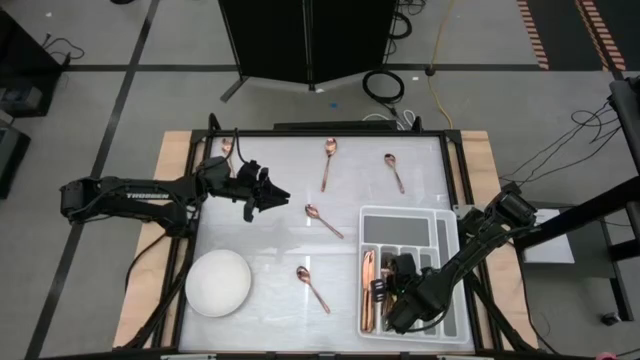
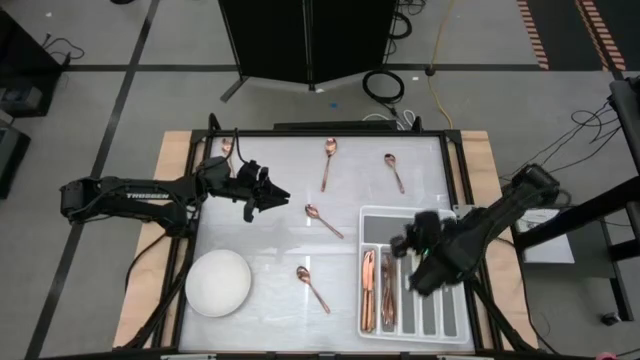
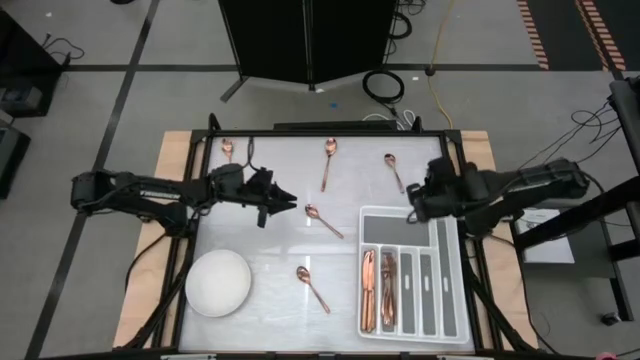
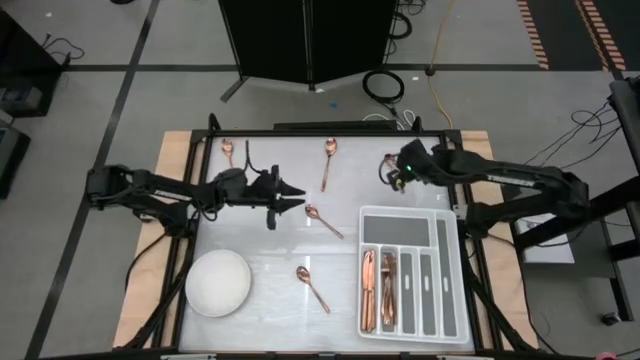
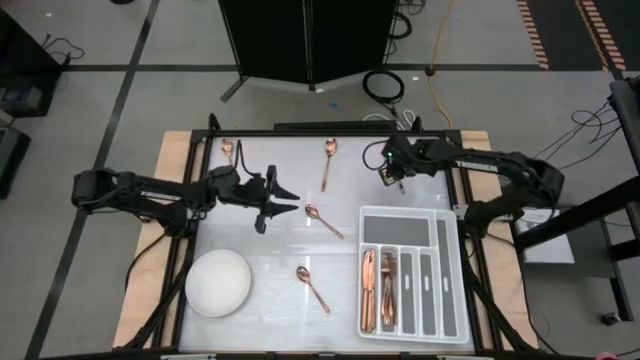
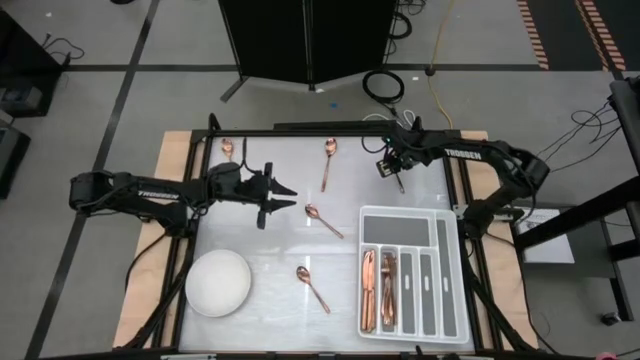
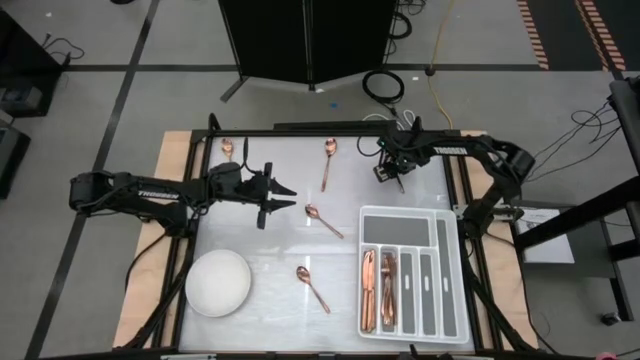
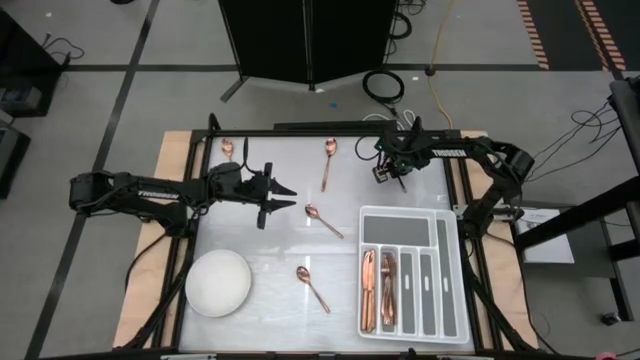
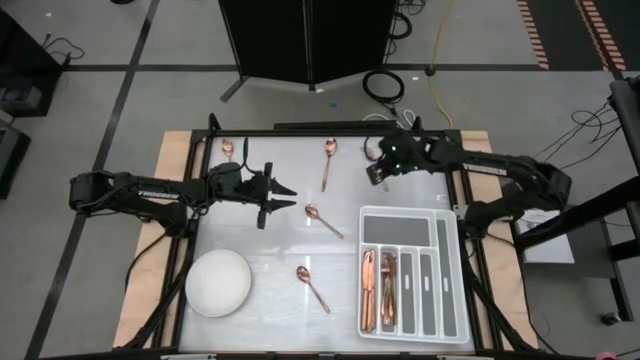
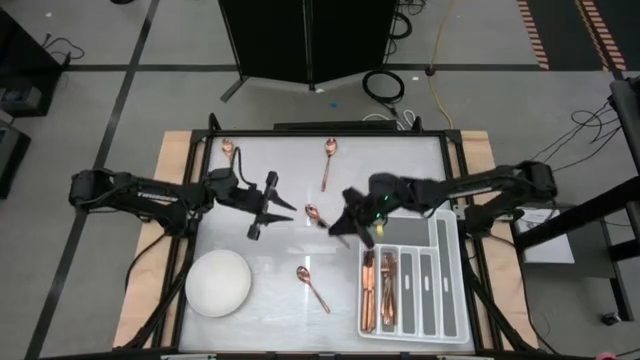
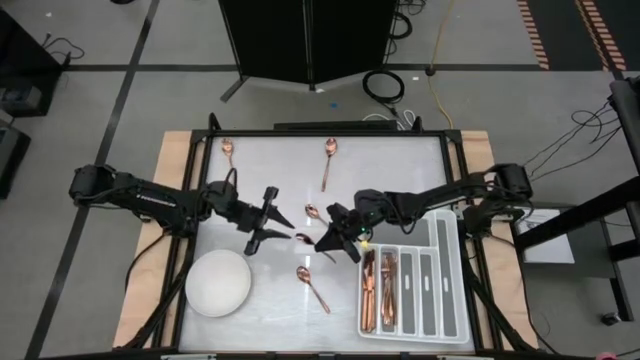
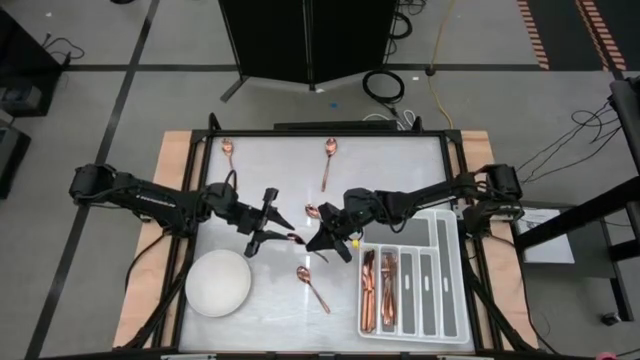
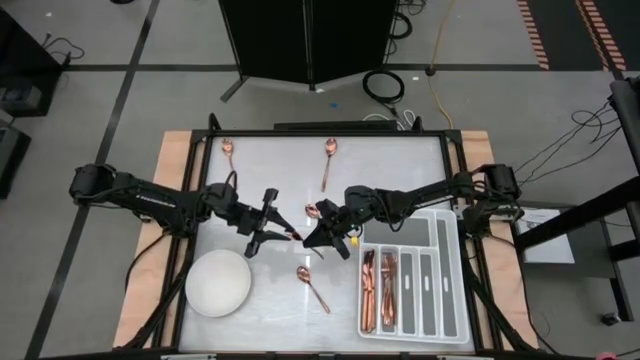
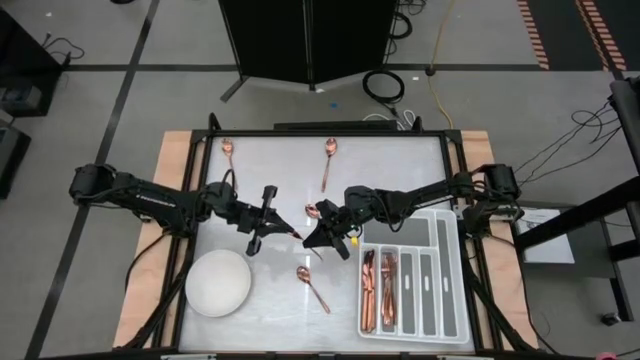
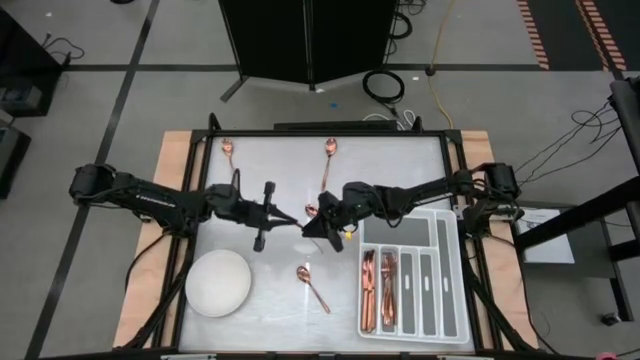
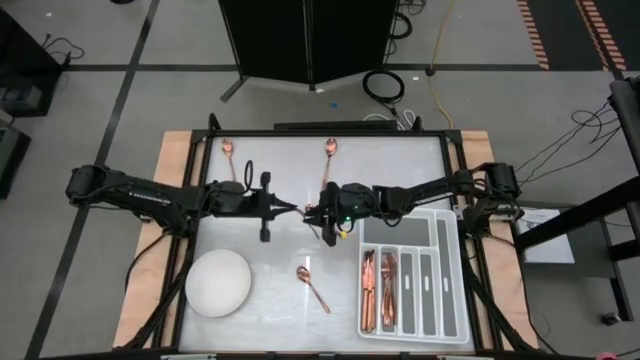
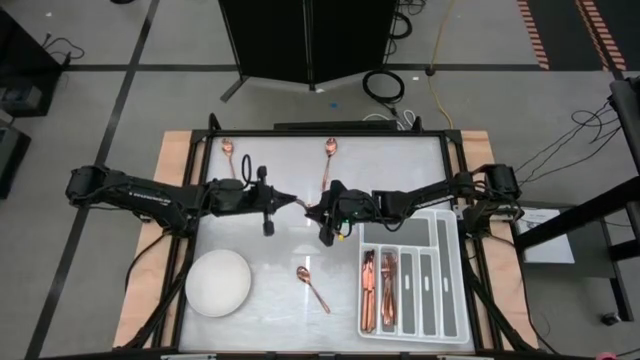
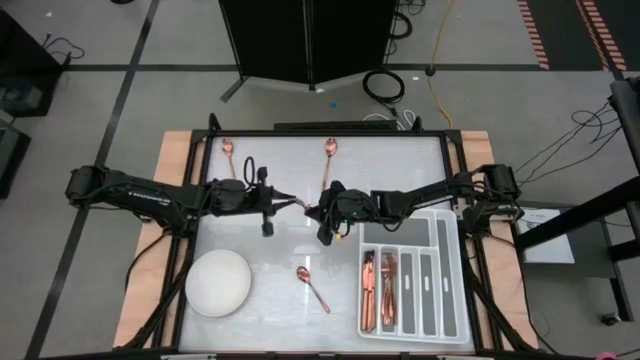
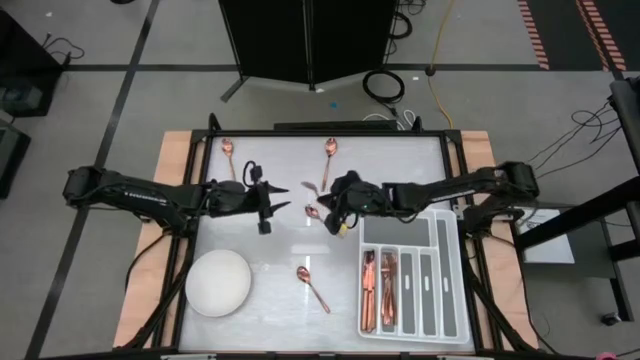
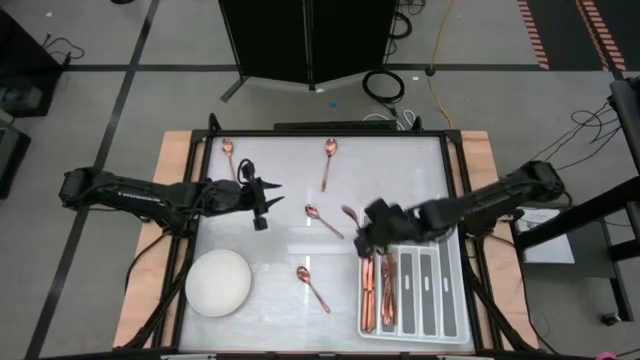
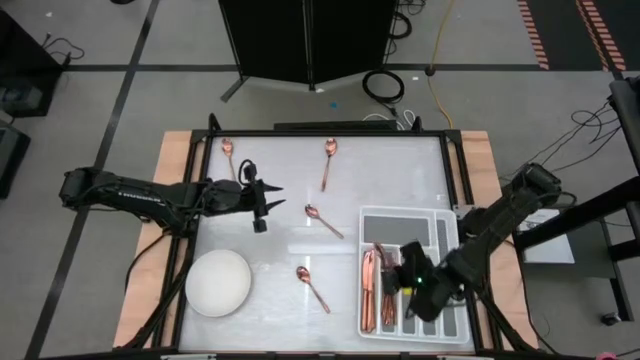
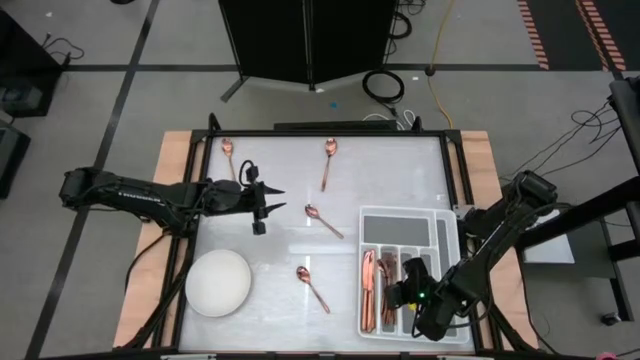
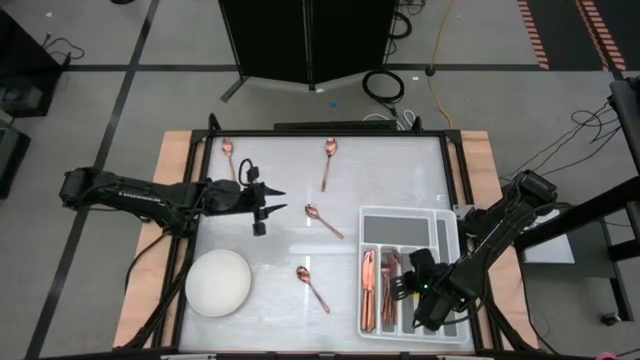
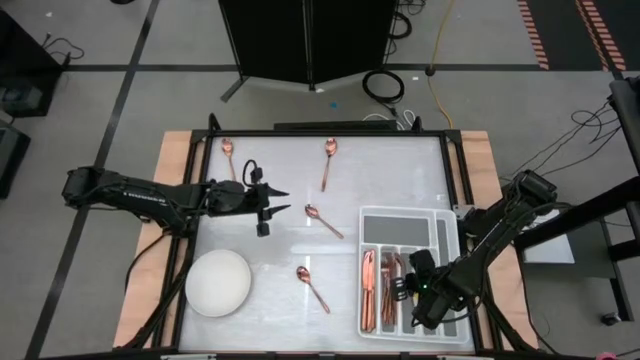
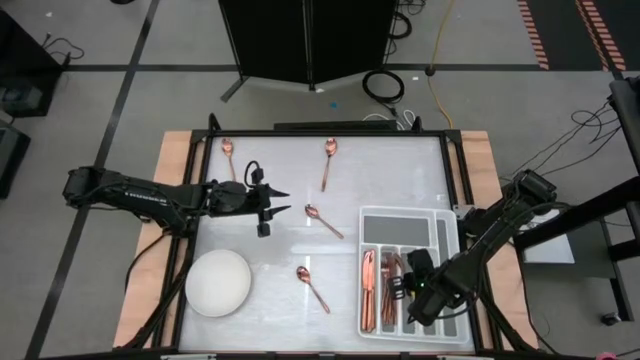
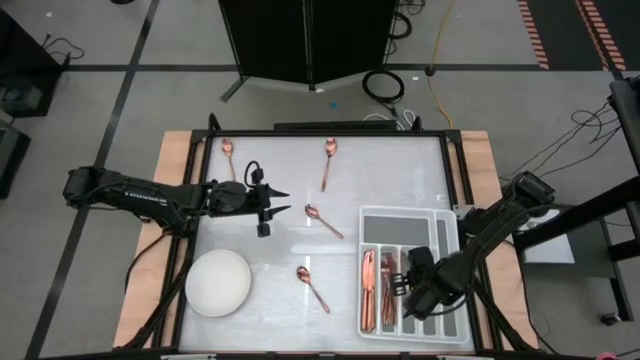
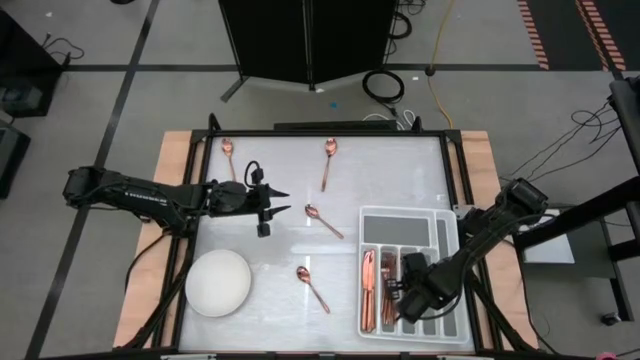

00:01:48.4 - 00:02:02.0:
Task: Sort silverware
Put the brown spoon in the white silverware organizer

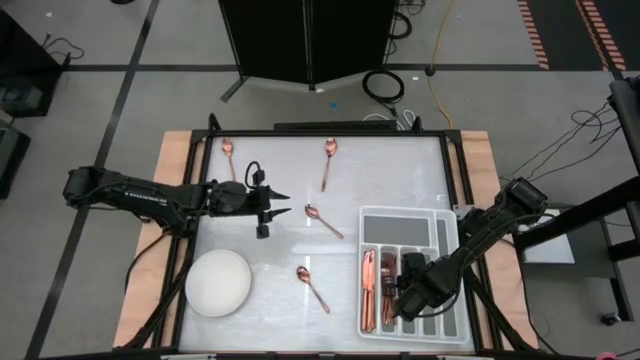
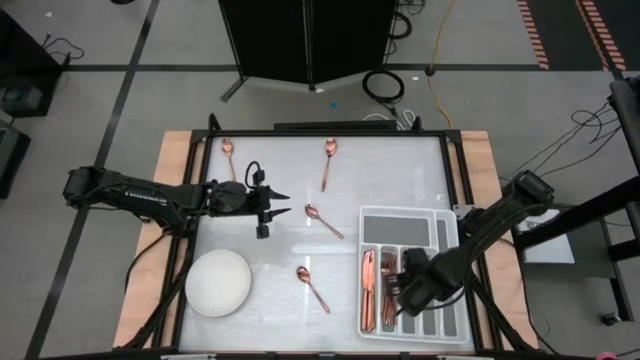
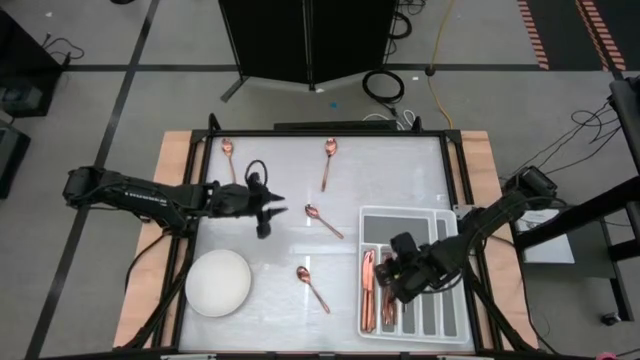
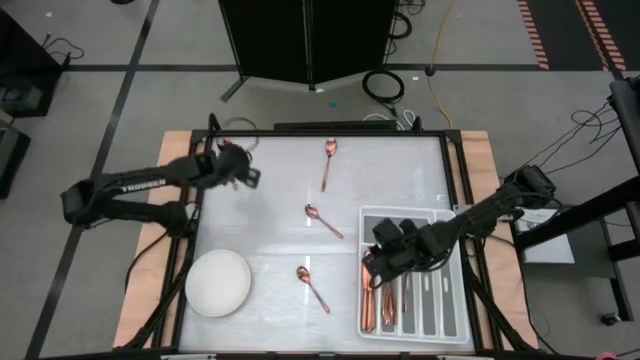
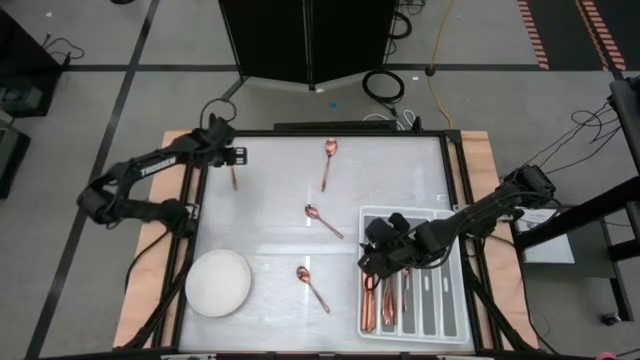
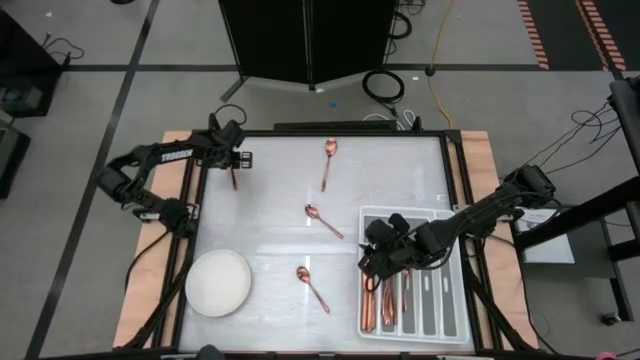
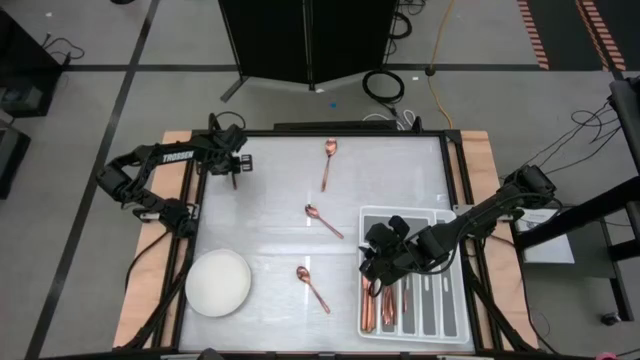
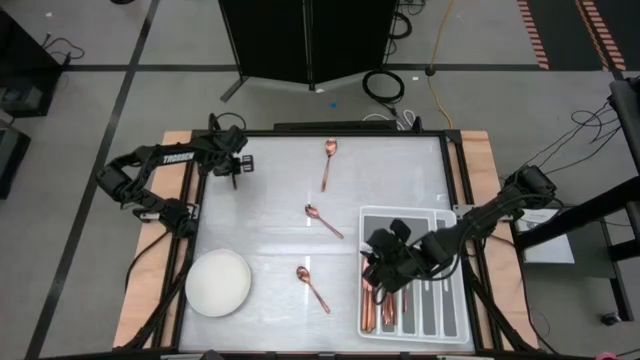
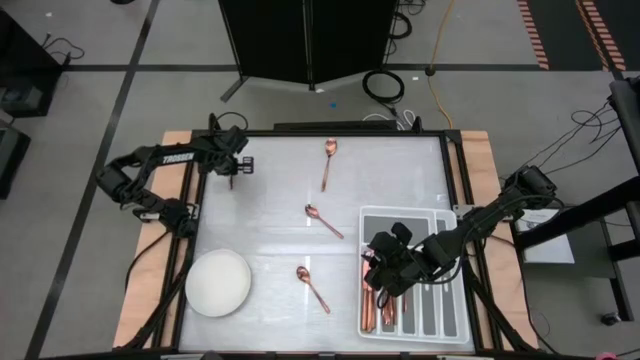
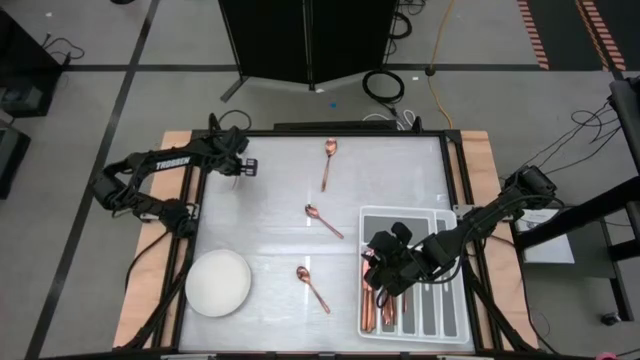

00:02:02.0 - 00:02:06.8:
Put the brown spoon in the white silverware organizer

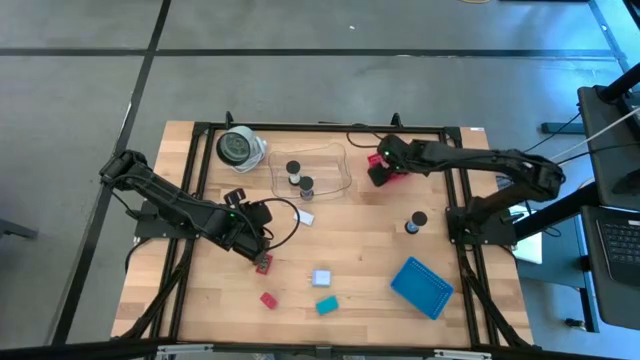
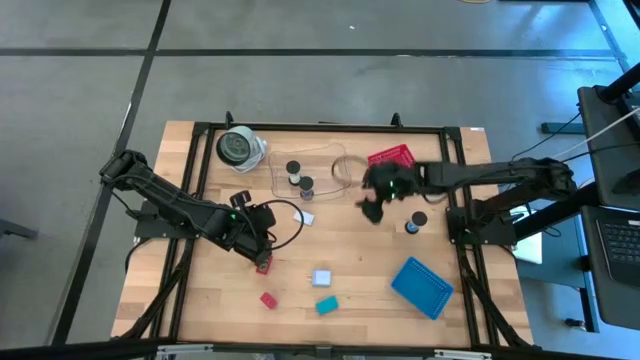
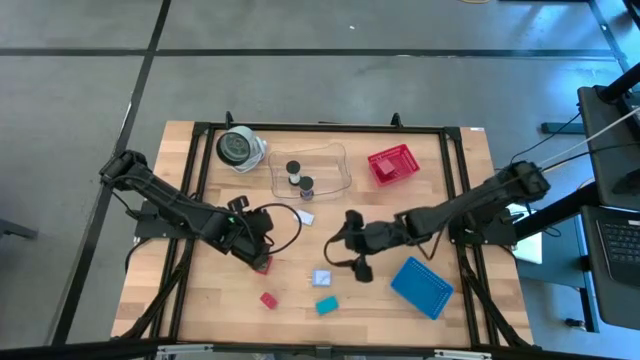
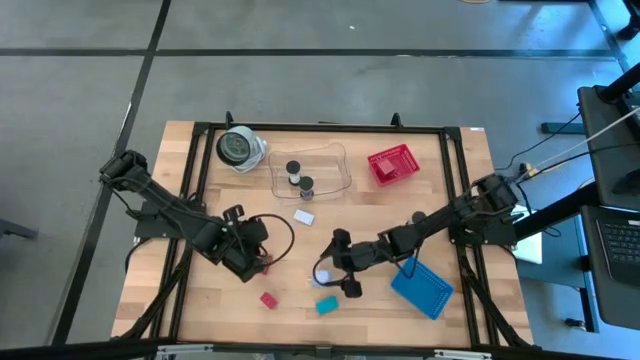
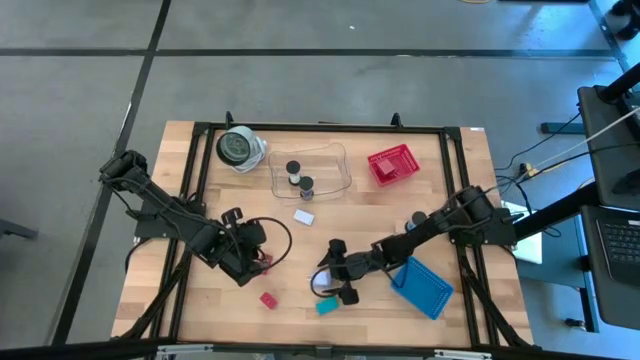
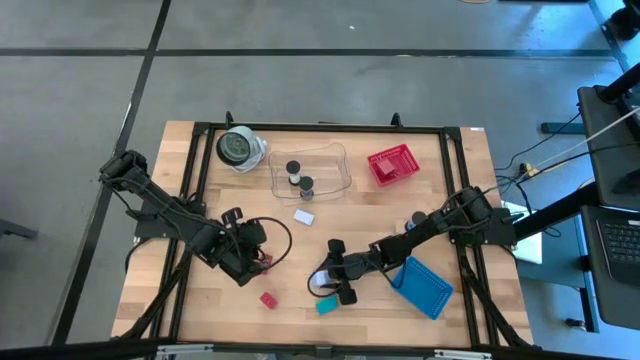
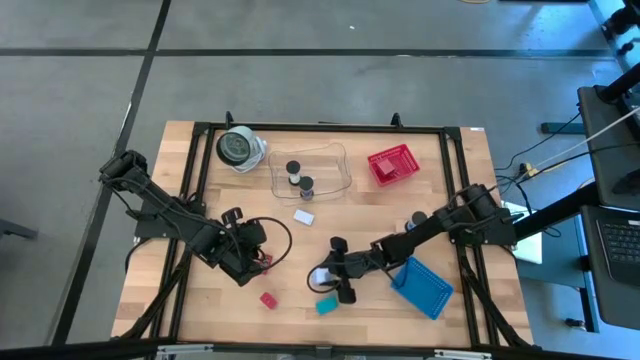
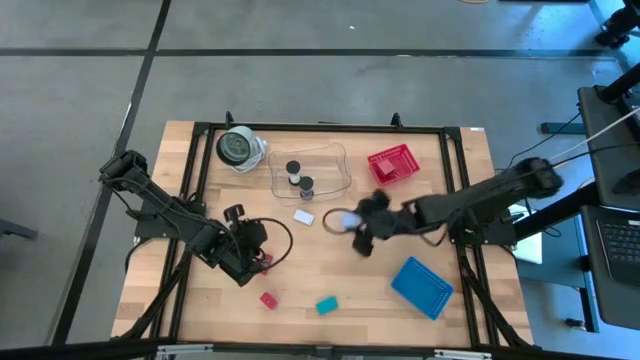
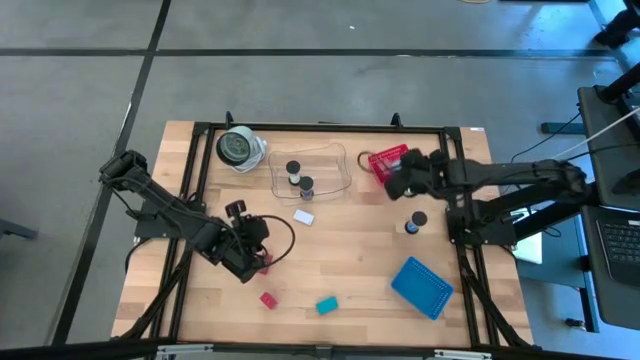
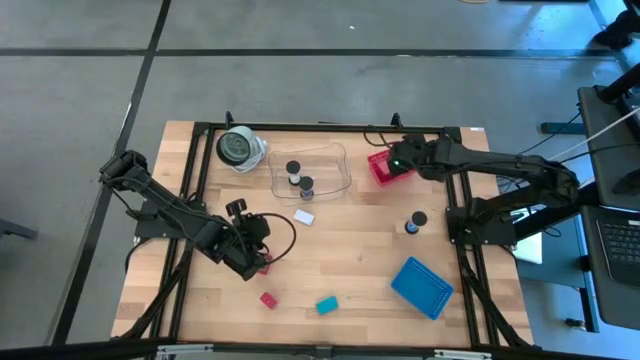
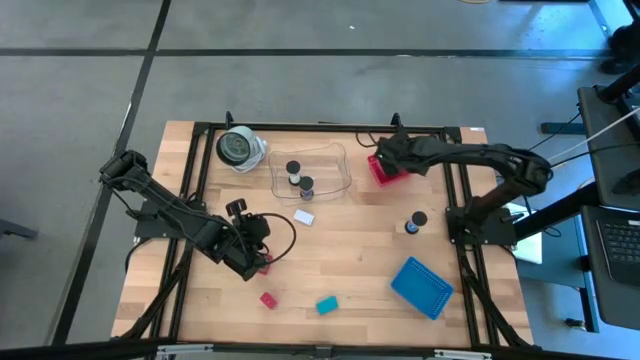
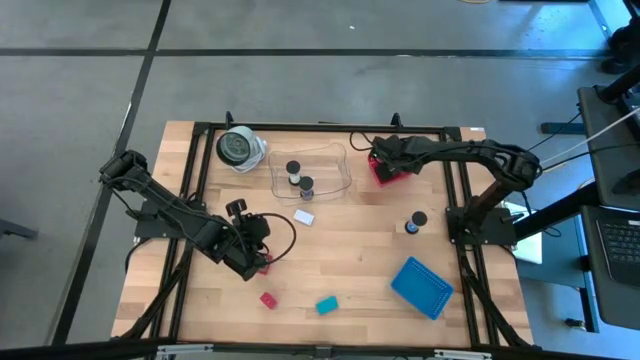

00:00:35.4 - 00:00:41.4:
Task: Pick & Place Office items
Put the light blue charger adapter into the red bin
